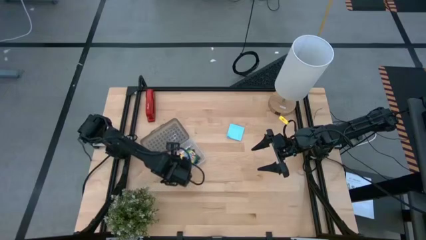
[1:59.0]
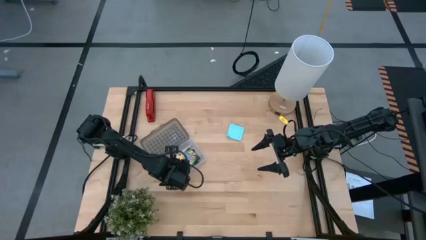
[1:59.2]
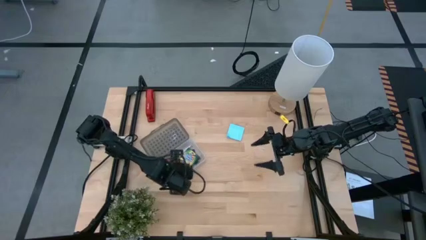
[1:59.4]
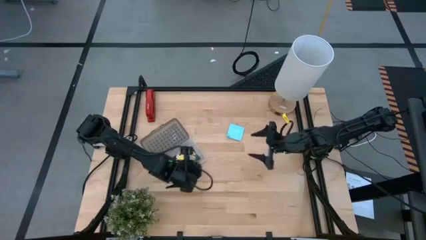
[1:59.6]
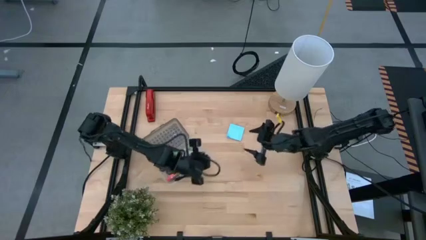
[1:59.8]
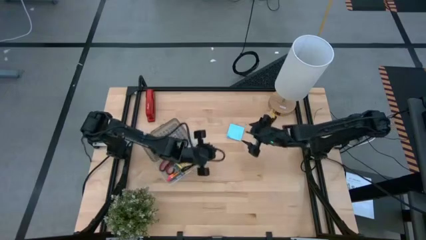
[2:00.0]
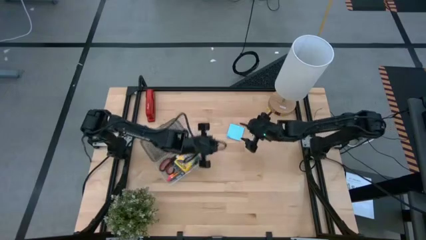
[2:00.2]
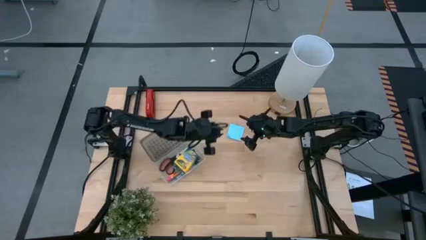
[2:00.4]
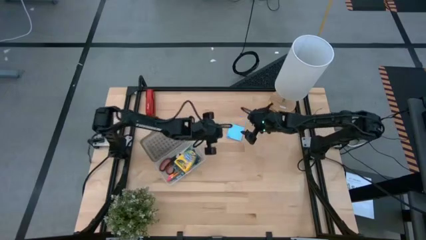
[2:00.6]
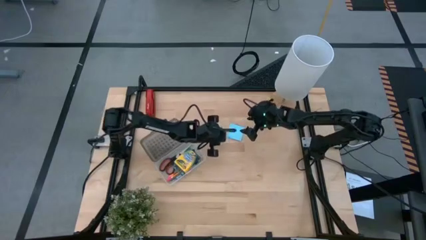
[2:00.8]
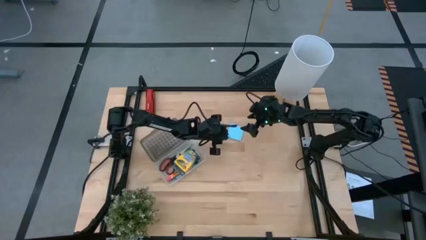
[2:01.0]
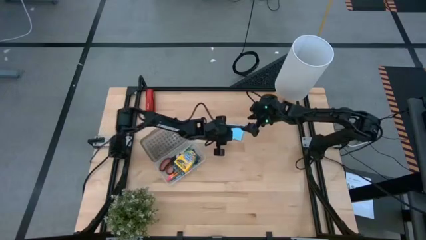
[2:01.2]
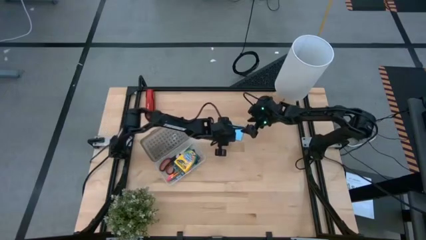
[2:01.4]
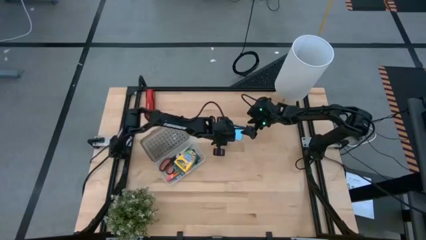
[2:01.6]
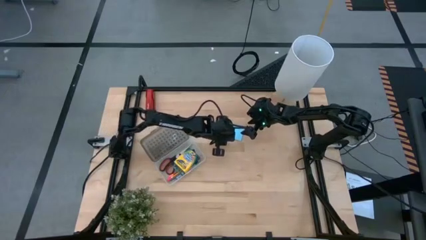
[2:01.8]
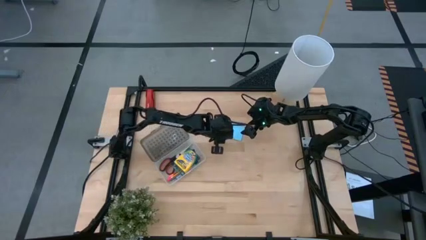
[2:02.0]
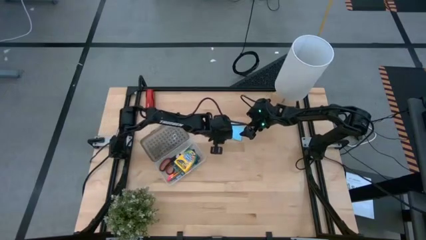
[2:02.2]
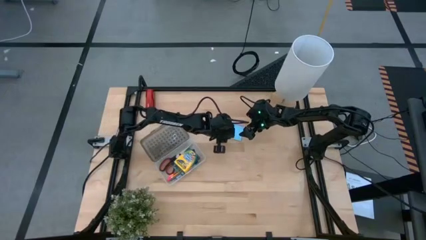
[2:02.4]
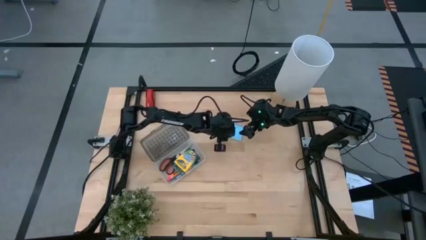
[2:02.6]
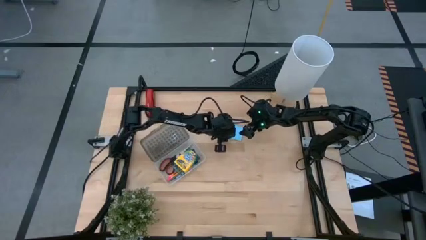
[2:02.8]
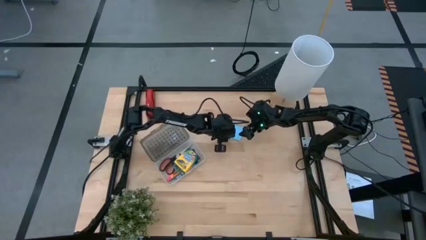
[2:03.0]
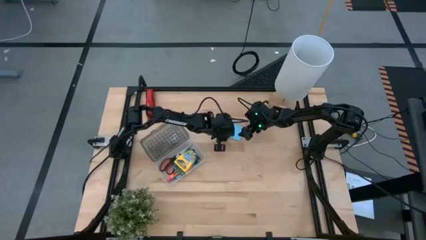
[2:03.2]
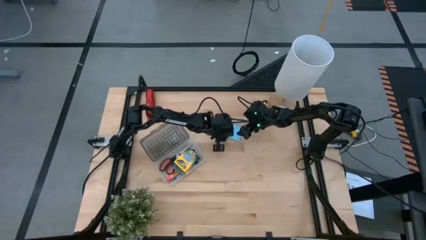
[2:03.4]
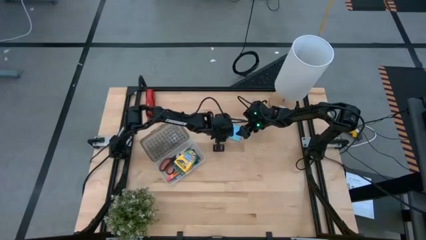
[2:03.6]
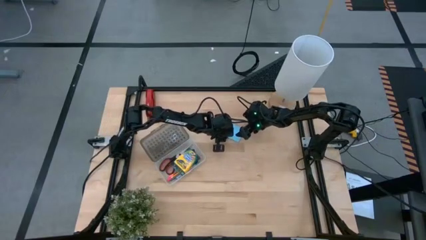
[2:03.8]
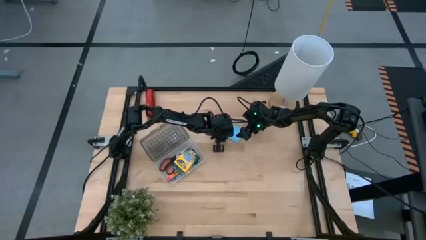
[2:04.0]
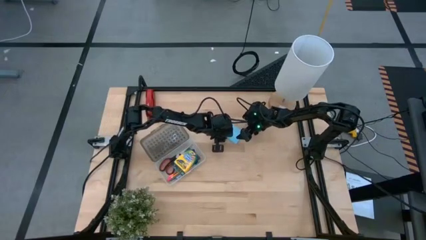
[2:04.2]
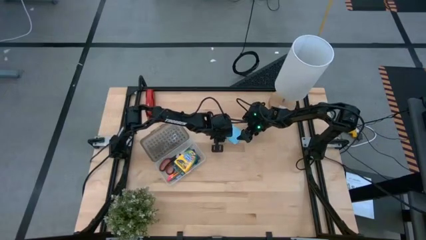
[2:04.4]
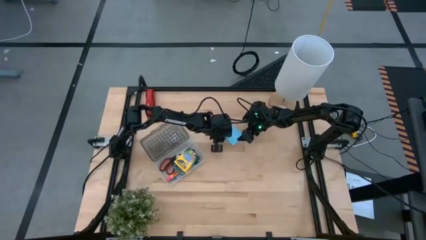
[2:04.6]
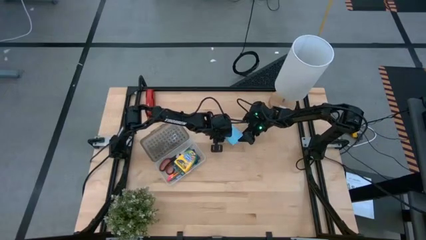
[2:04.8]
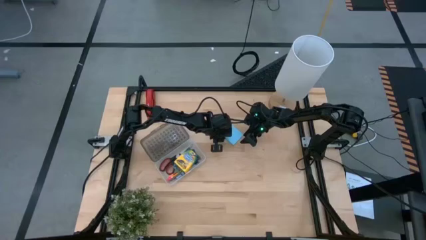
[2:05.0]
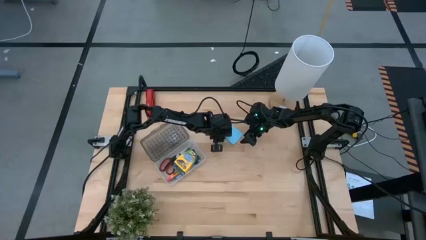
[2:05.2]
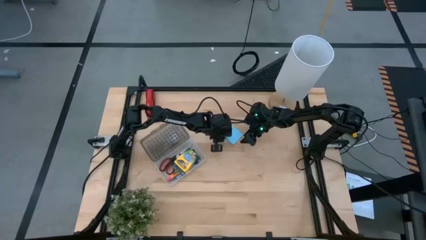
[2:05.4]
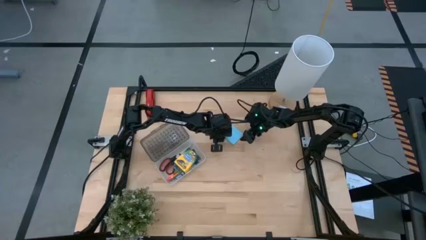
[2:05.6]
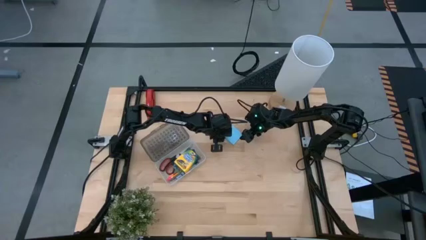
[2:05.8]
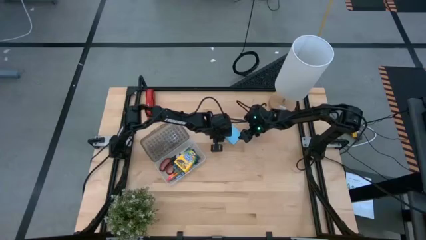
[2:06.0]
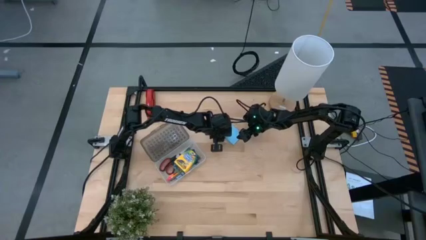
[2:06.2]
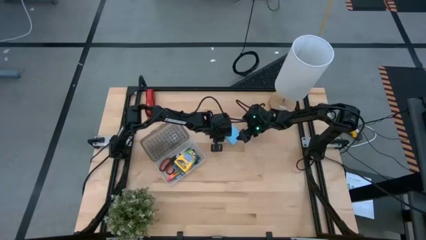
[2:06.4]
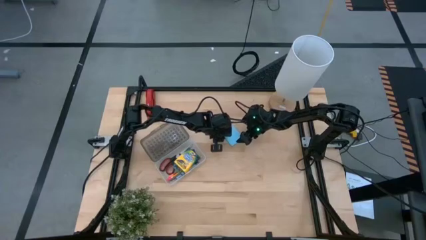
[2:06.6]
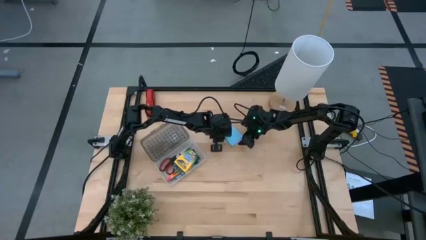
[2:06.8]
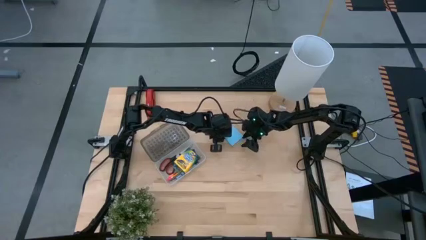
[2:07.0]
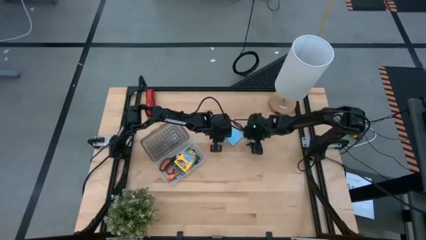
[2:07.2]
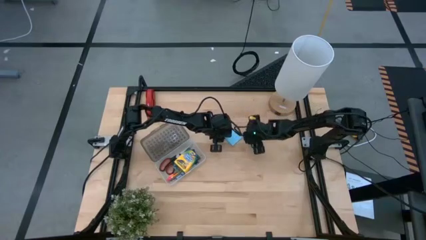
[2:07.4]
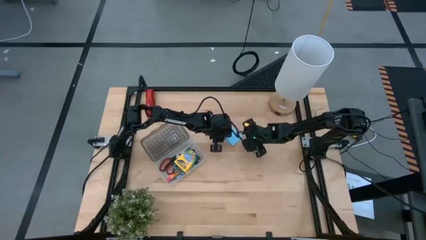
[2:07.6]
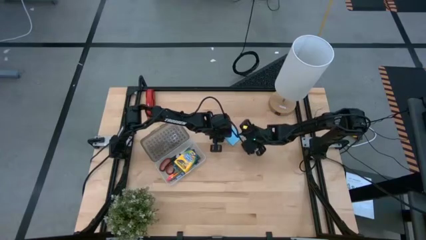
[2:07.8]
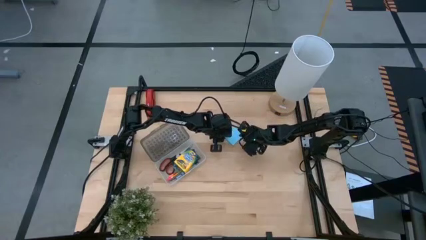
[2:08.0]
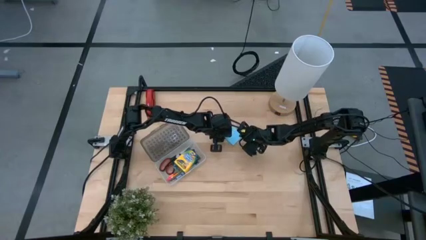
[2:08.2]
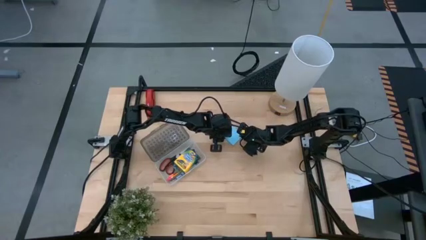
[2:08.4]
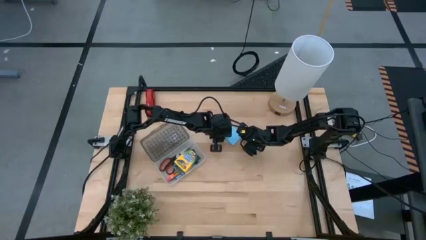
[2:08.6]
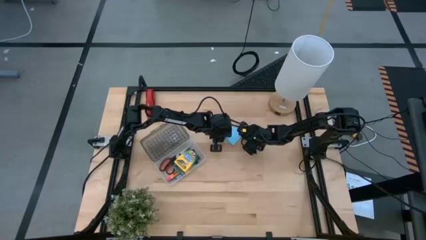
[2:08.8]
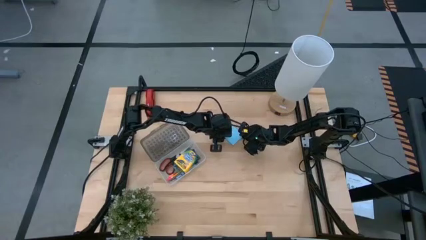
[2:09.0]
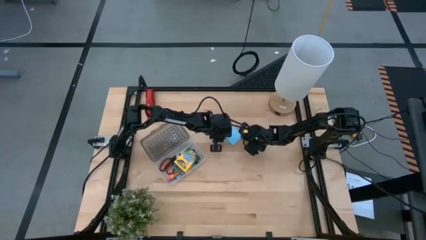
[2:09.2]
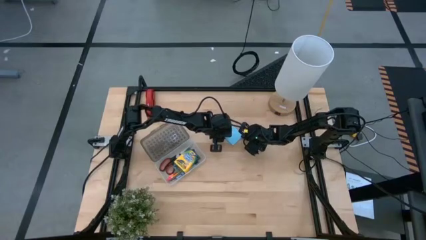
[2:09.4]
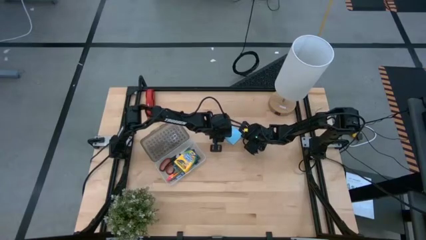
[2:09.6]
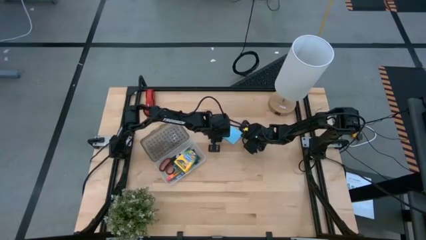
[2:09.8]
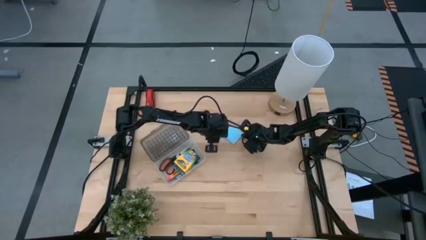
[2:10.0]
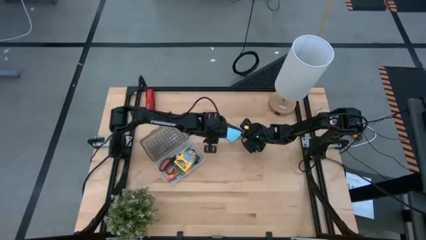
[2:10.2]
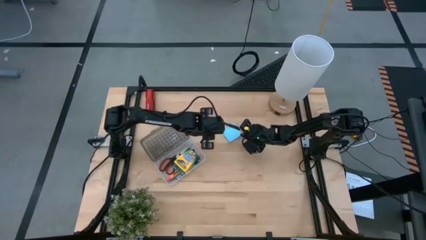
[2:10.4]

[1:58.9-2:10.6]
Task: Pack school essentials
Put the blue sticky notes into the supply box

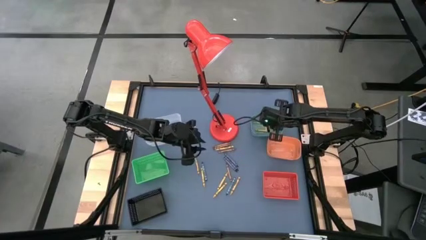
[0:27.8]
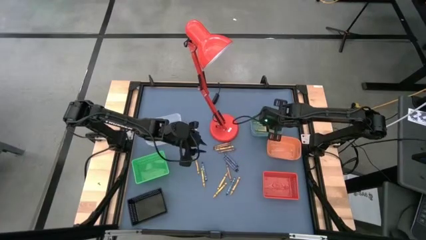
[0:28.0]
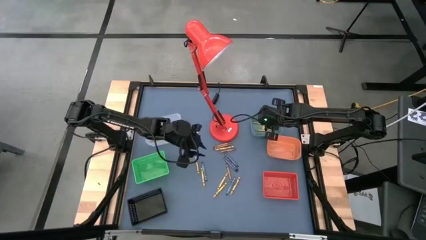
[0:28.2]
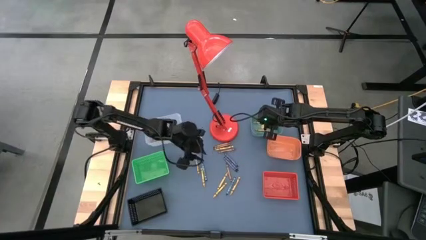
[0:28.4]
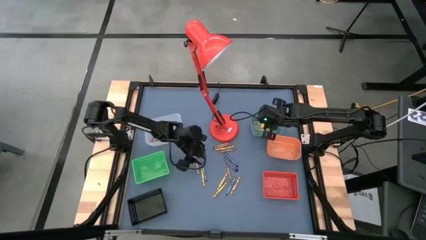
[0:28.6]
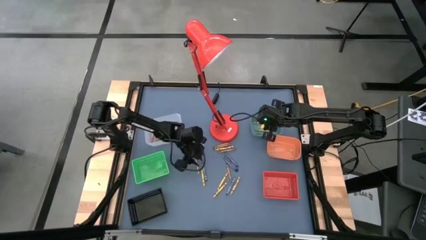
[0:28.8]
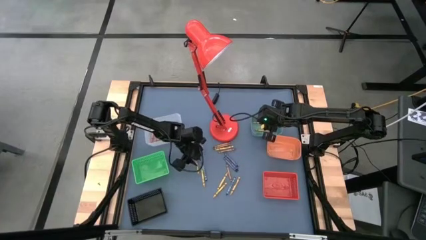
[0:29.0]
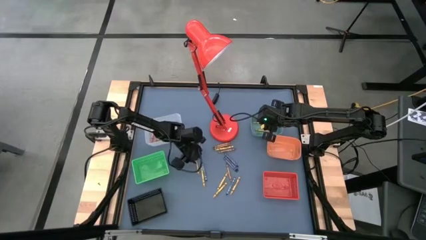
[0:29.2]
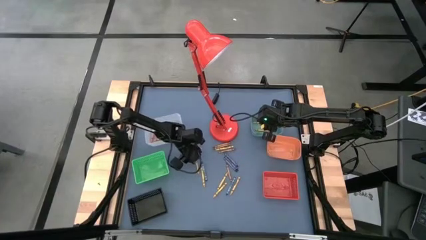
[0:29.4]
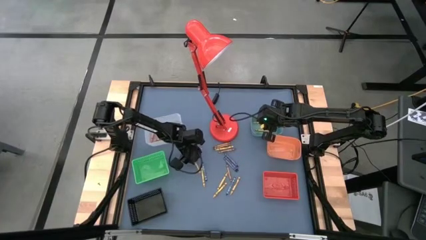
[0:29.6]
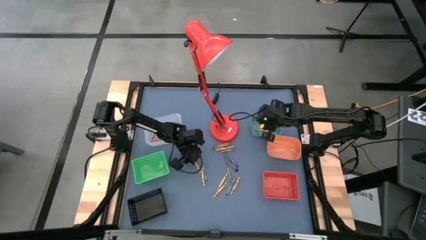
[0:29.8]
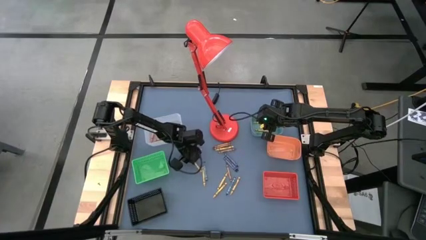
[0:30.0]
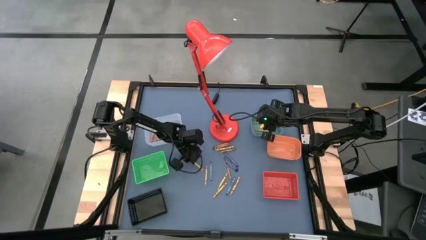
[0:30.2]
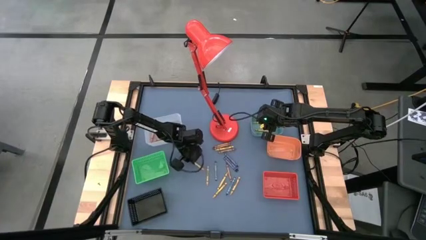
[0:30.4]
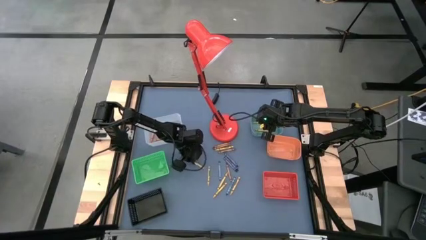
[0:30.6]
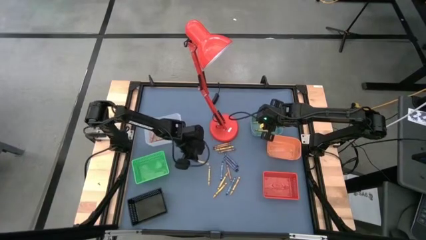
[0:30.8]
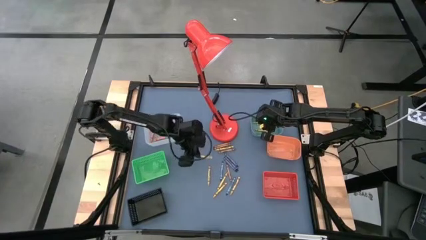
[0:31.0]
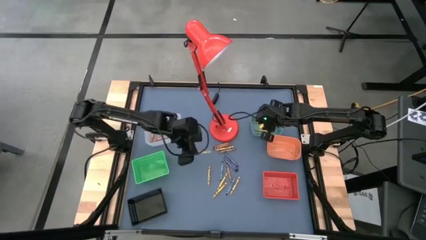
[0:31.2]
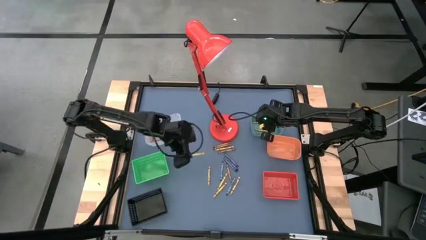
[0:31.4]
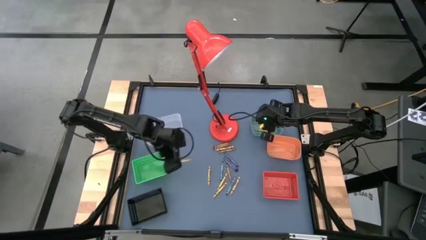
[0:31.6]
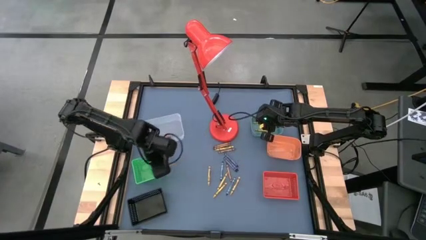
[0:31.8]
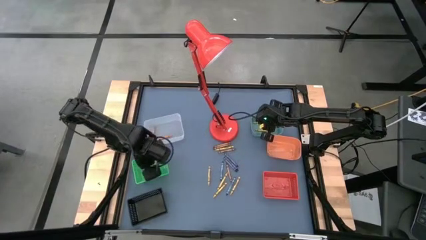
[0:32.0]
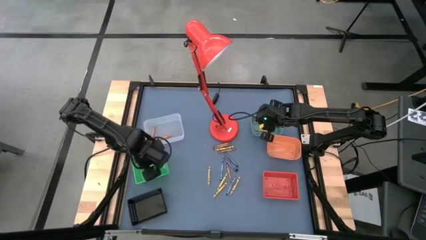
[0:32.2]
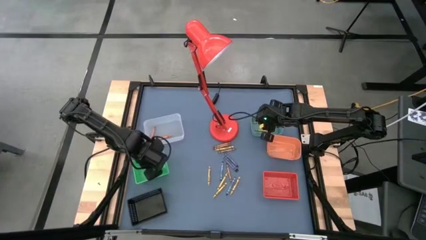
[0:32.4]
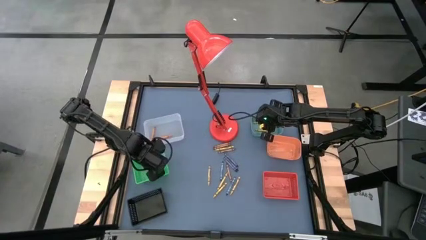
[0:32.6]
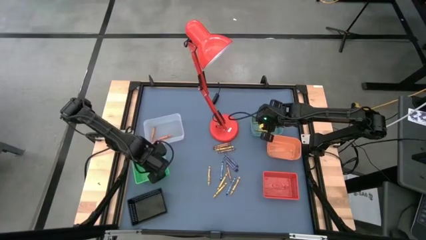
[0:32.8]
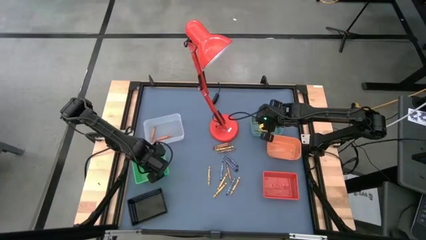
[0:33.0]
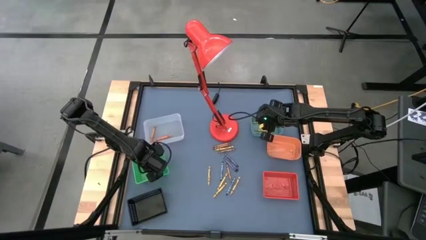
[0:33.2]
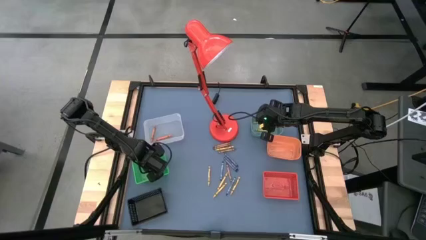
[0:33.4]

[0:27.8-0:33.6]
Task: Sort crayons
Put the golden crayon into the green bin
